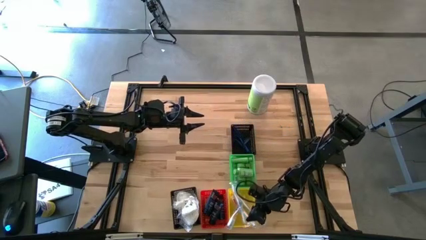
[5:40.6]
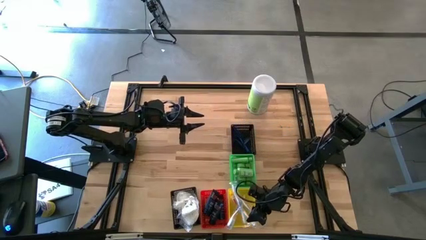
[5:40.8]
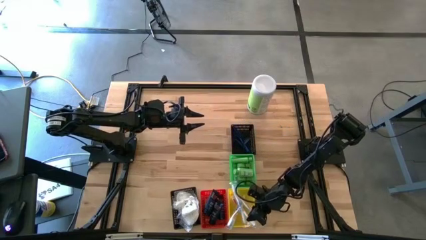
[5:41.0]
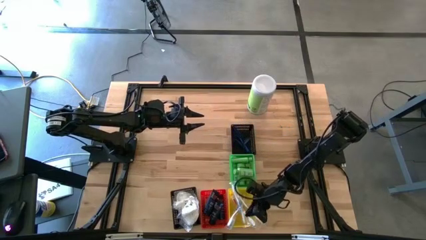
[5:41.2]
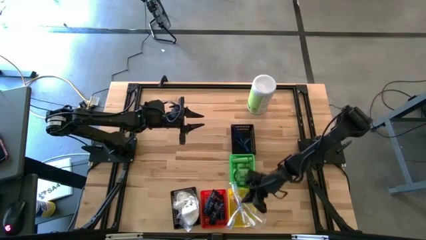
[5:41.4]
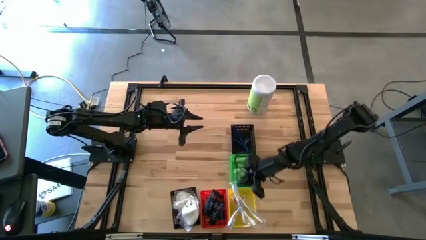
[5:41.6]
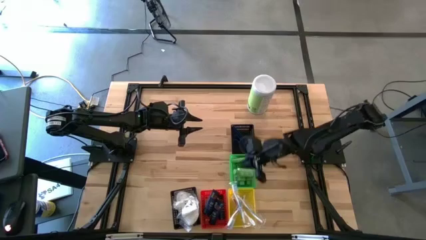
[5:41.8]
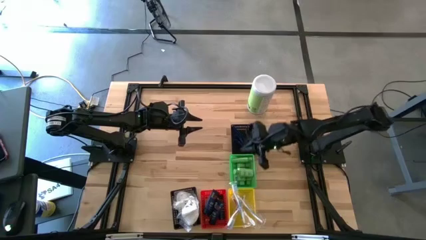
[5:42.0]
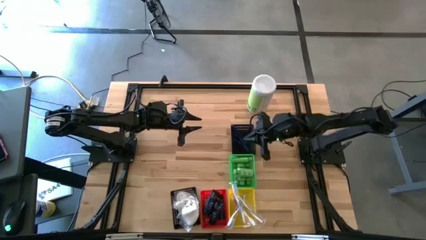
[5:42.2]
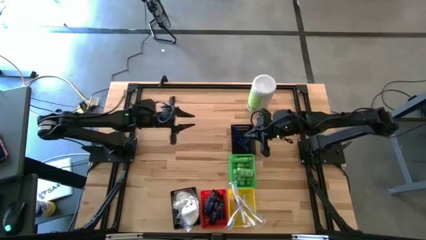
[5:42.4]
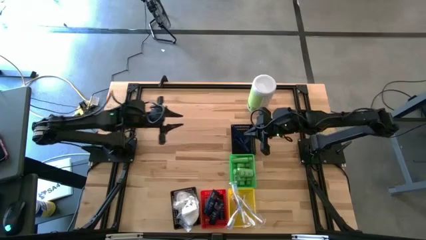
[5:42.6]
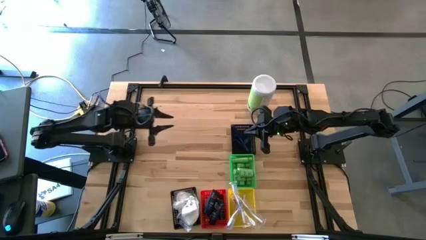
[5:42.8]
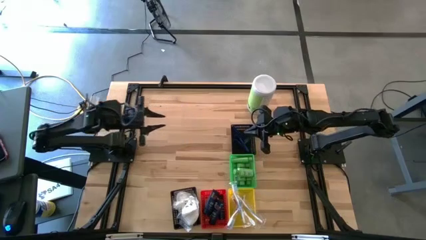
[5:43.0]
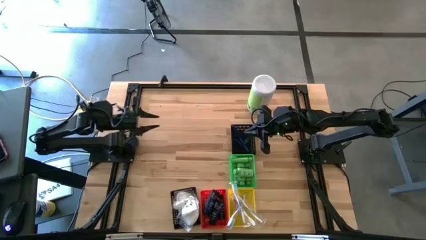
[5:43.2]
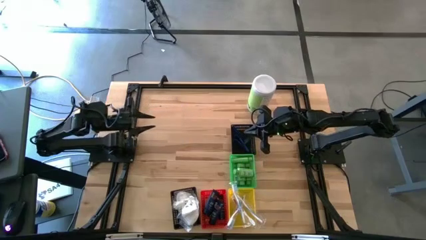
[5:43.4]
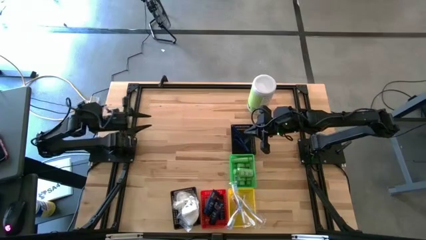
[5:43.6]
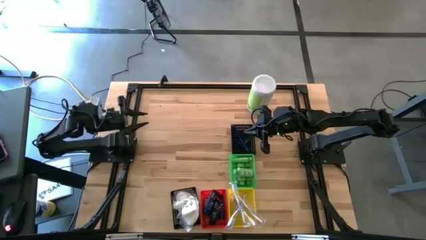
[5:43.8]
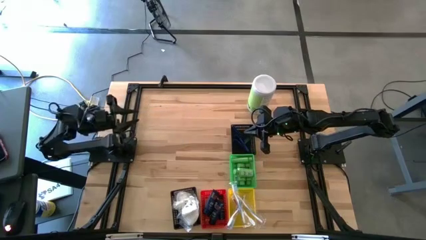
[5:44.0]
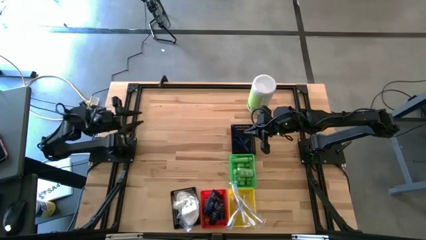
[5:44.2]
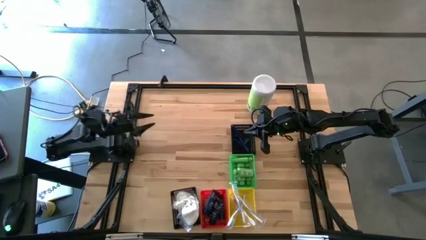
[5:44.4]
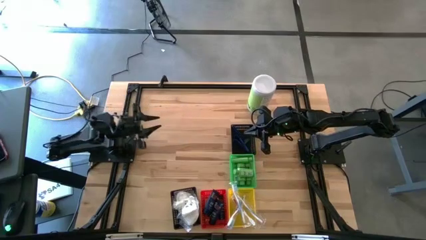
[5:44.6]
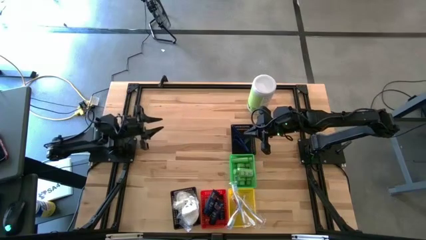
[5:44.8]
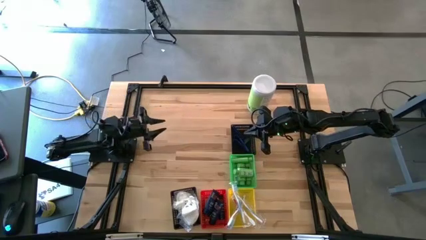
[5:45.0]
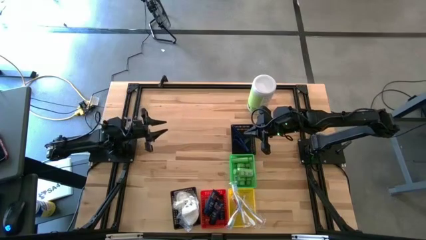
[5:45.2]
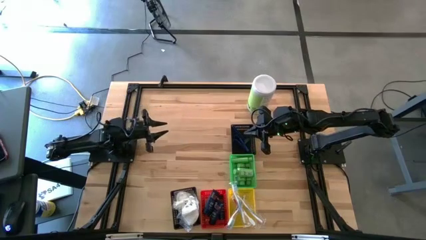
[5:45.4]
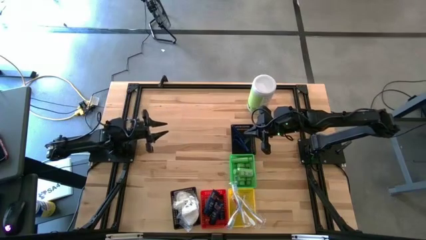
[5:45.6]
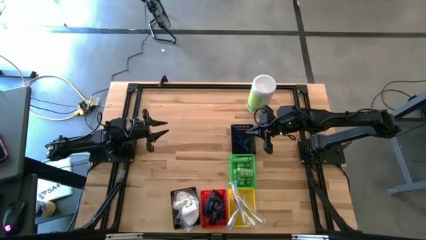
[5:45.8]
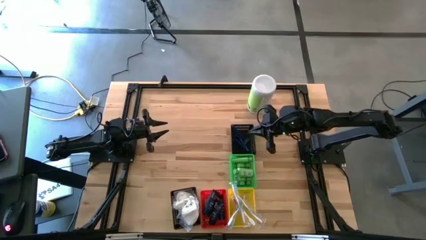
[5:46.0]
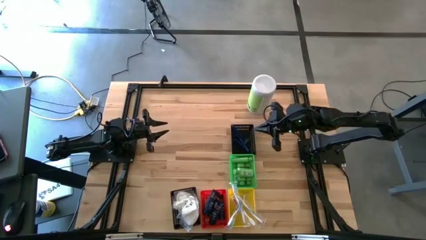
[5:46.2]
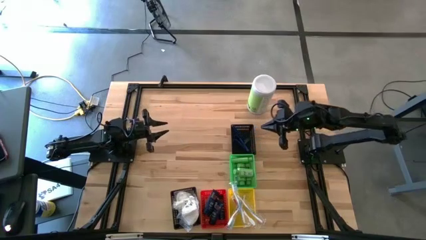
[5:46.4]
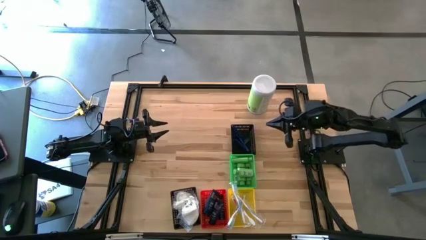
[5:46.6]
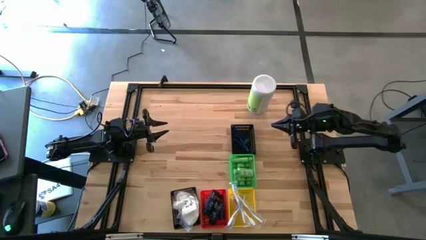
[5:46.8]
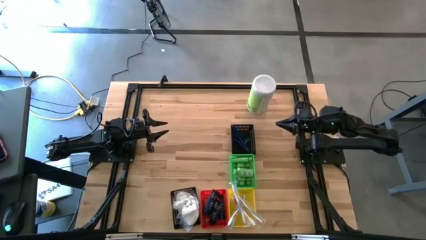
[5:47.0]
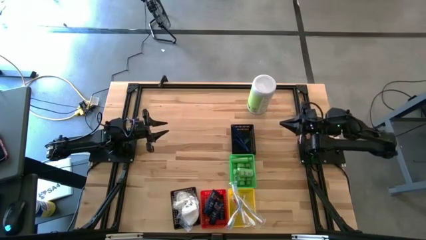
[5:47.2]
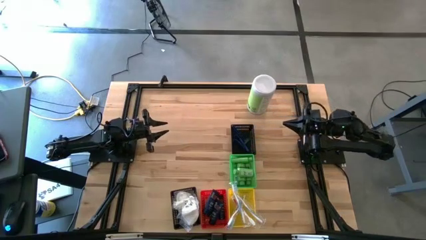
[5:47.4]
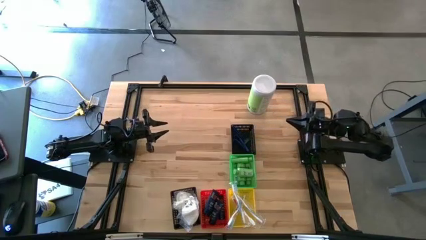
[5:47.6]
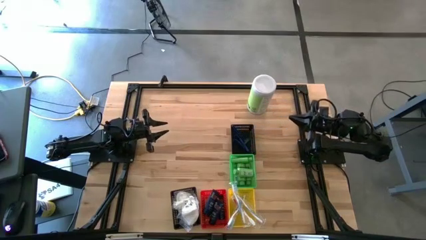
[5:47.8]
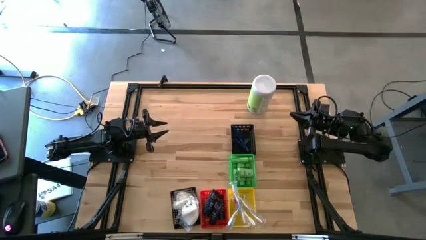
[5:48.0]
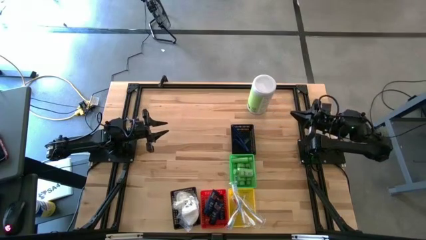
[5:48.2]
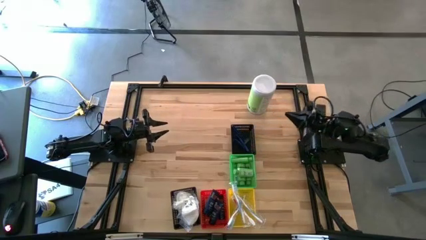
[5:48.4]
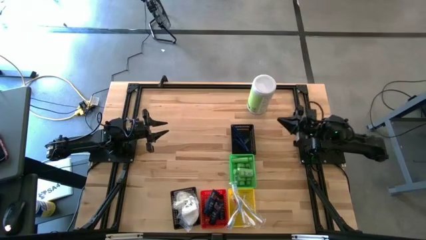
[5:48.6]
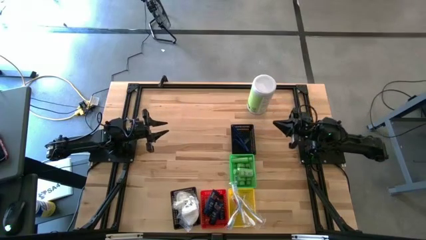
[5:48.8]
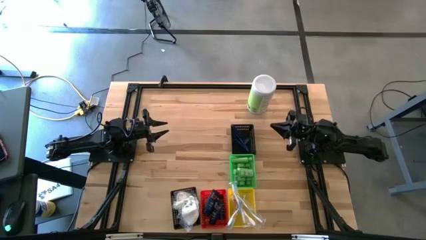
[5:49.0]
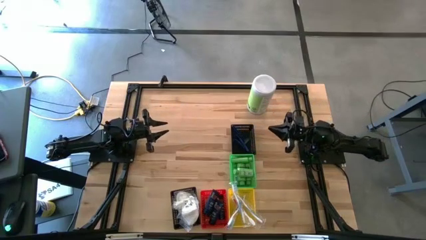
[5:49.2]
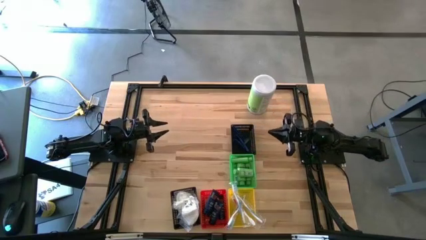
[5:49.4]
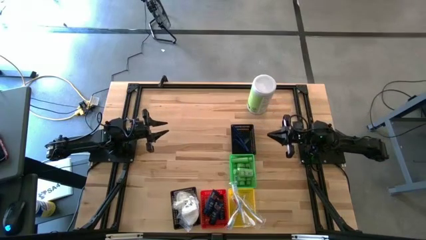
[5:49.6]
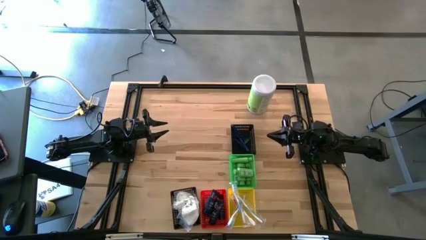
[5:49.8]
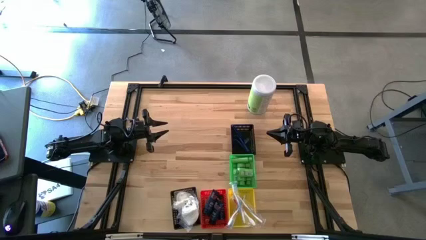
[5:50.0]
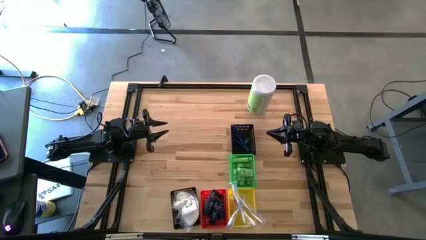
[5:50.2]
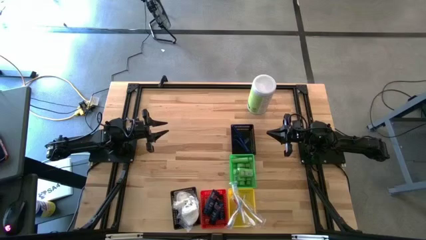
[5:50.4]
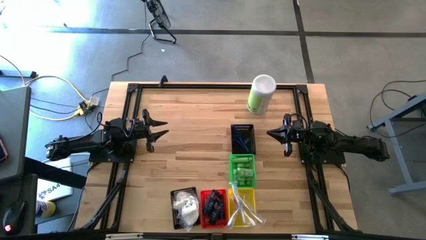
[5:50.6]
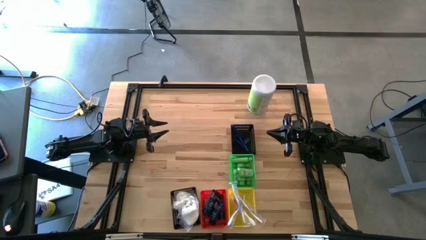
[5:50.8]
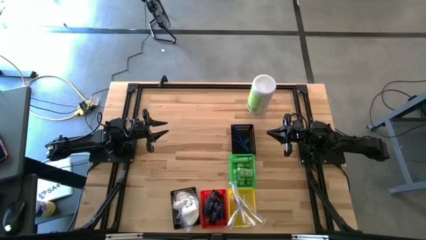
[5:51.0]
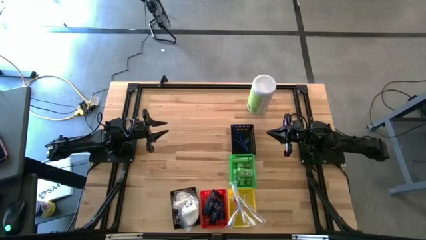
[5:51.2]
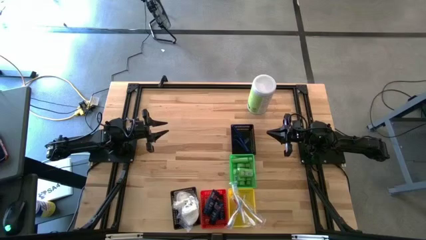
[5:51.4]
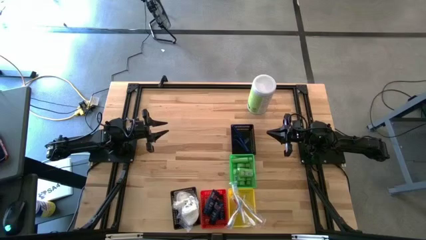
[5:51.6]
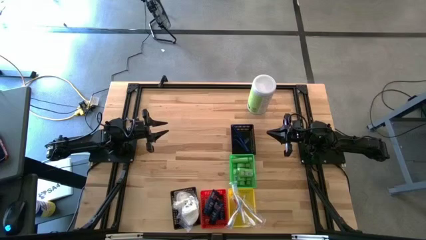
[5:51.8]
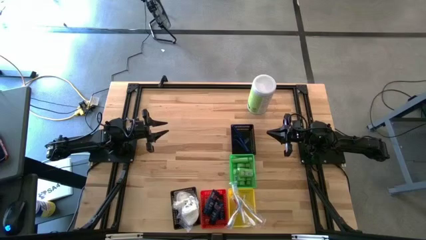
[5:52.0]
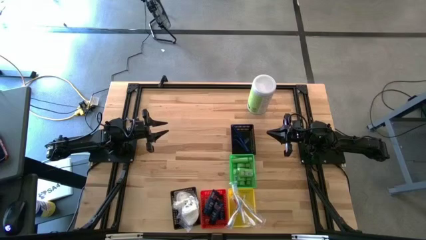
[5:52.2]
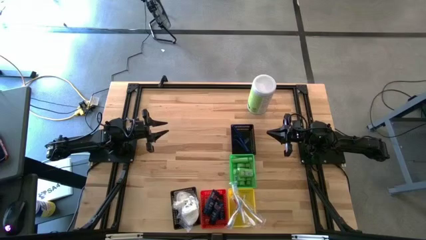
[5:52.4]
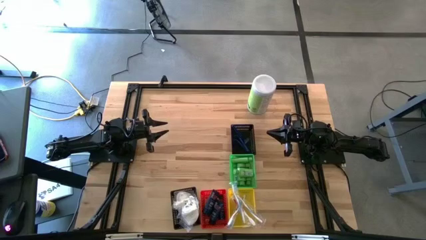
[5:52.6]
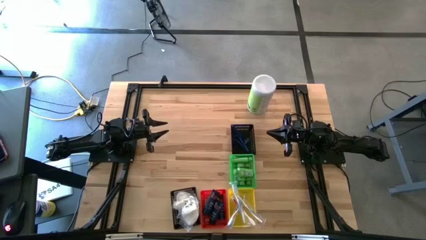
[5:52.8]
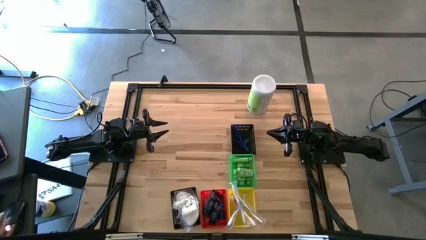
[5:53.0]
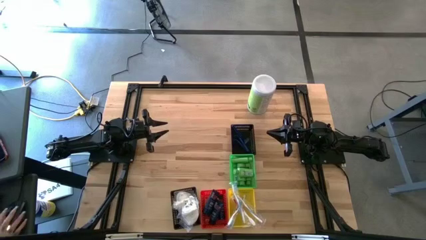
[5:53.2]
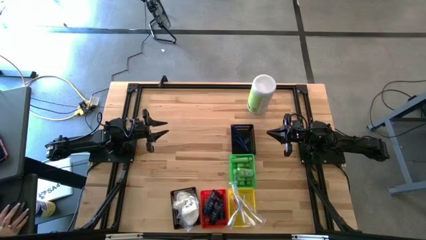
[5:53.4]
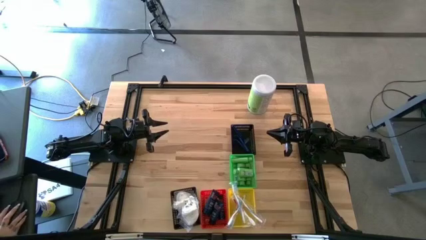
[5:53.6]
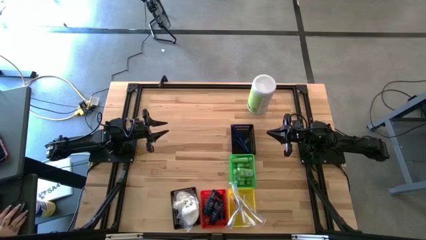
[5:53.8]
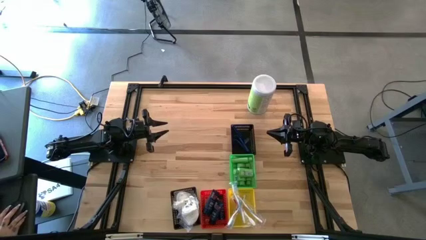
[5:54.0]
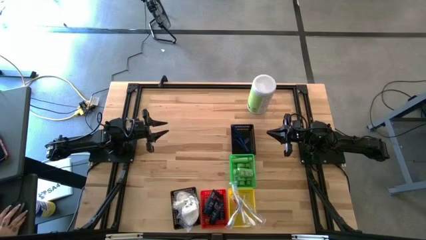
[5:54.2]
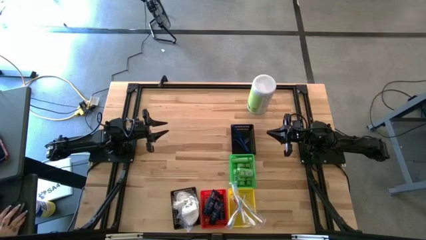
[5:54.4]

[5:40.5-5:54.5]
Task: Pick & Place Travel size toiletries
Return to Home Position

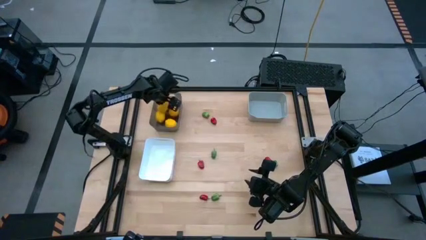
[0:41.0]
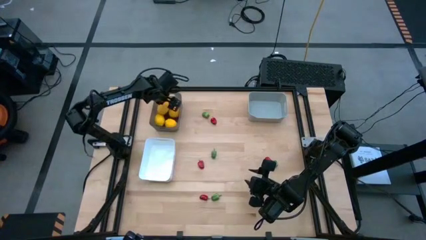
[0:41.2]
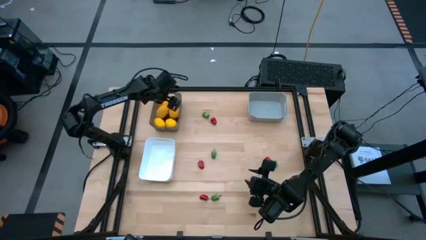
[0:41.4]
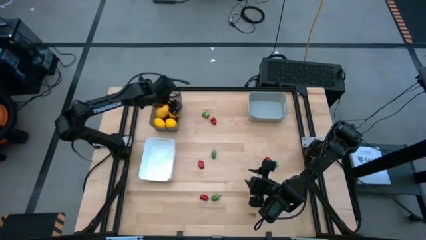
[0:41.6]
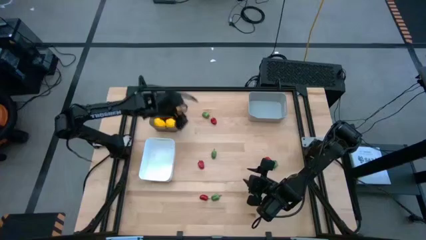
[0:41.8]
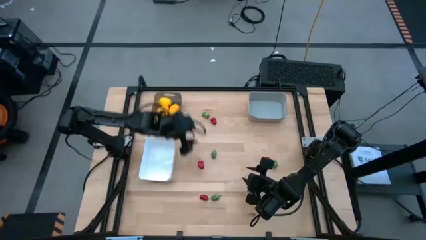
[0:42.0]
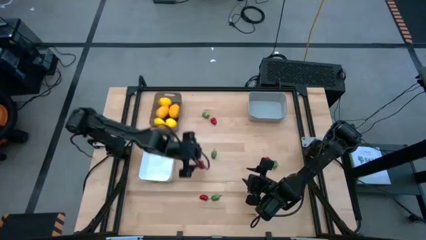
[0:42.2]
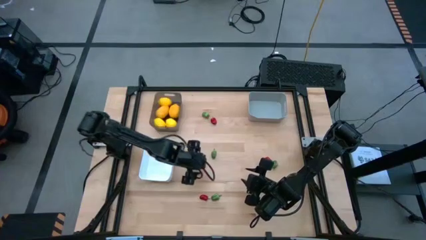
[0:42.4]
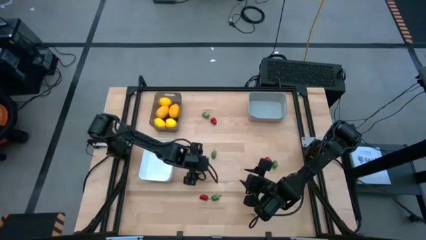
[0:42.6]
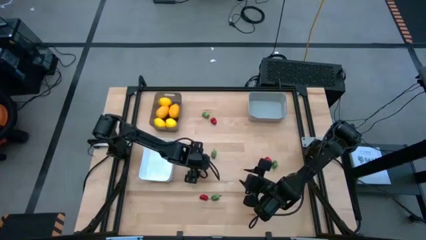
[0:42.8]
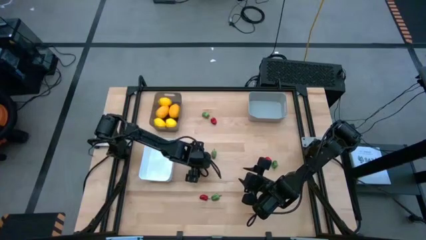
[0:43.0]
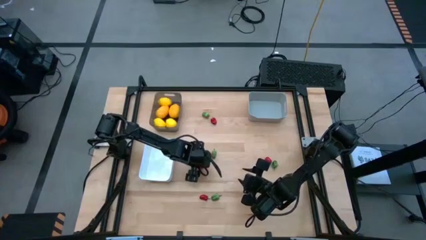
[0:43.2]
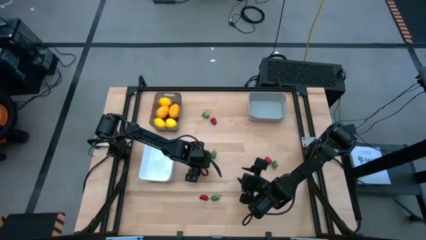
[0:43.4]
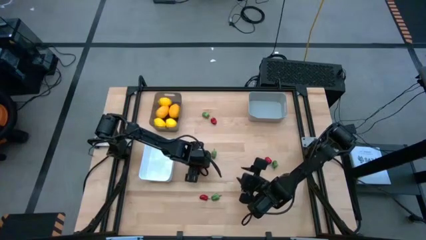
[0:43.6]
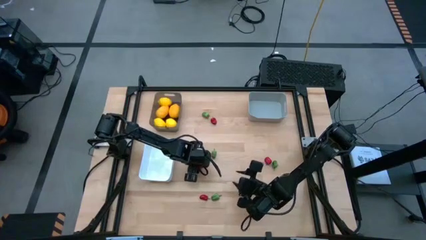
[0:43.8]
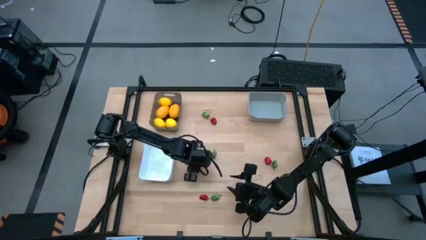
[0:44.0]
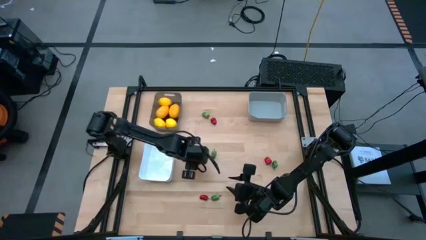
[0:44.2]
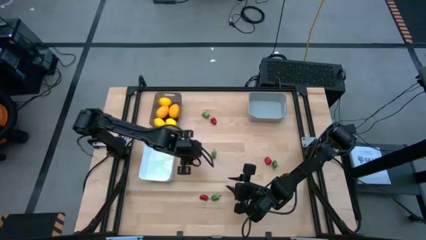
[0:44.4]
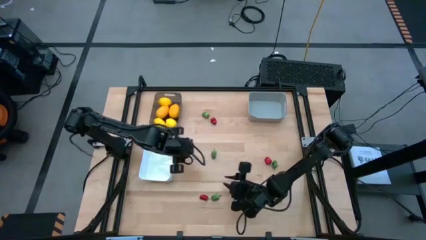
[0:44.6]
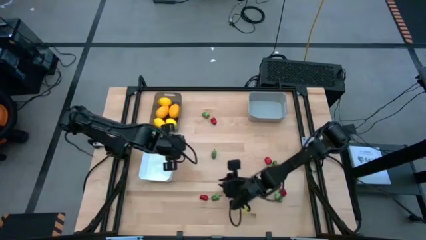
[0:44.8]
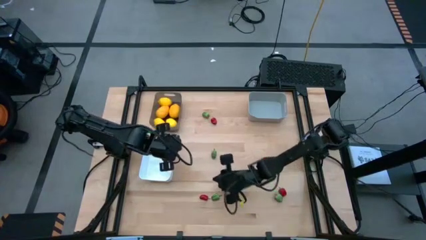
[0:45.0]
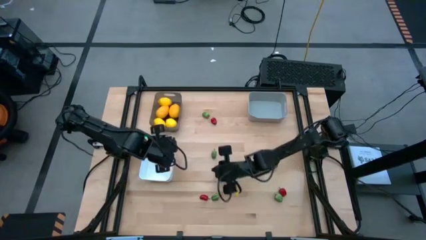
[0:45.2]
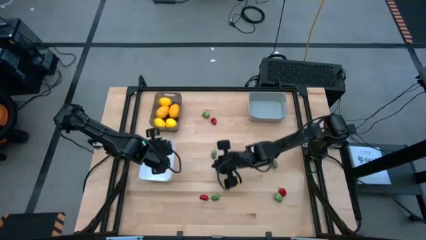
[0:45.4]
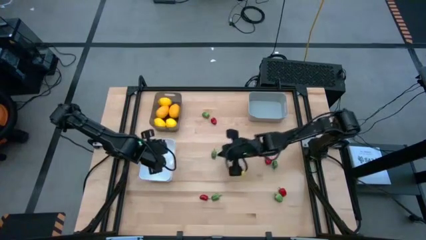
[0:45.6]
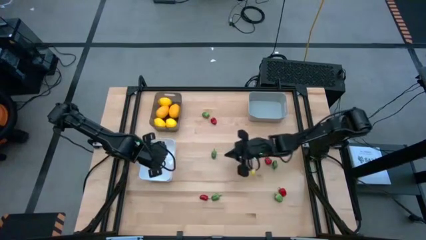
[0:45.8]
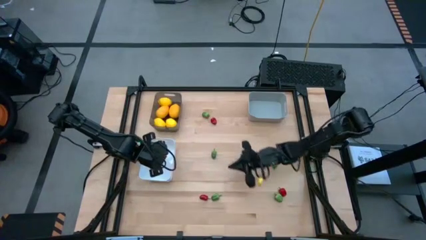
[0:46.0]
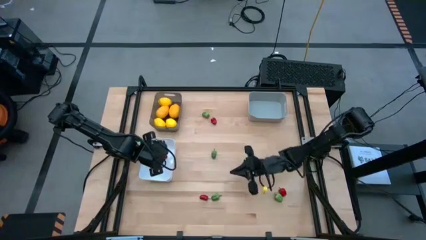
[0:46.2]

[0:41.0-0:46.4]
Task: Sort produce into baskets
Put the middle left red chili pepper into the white bin
